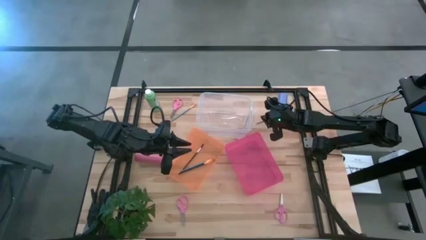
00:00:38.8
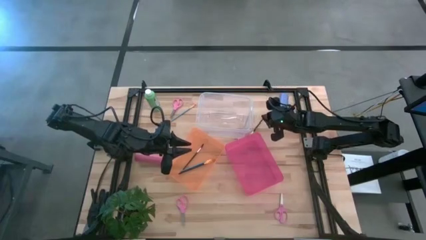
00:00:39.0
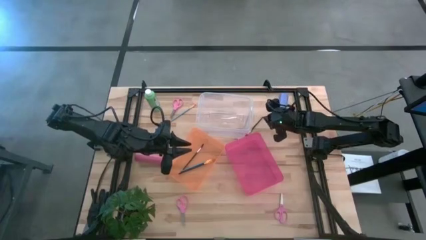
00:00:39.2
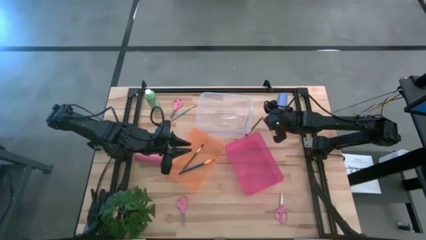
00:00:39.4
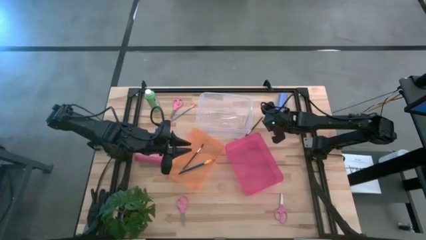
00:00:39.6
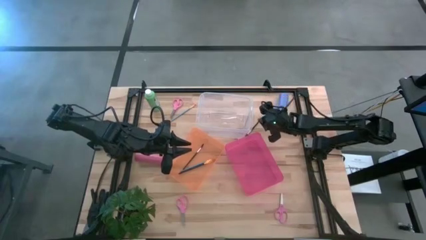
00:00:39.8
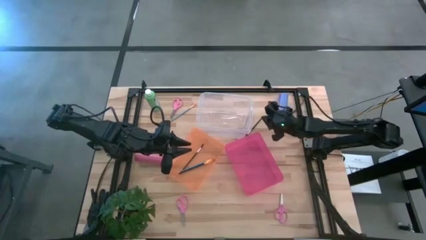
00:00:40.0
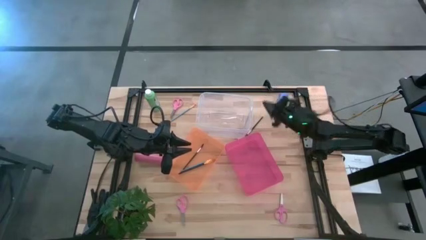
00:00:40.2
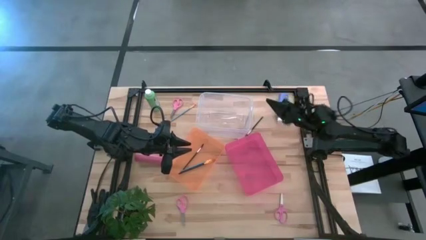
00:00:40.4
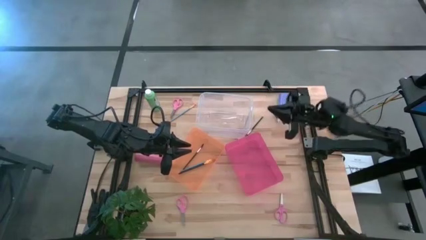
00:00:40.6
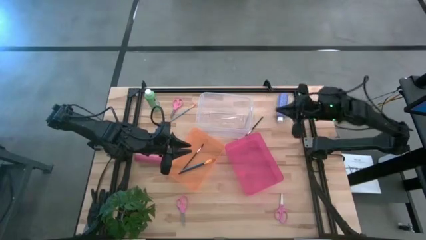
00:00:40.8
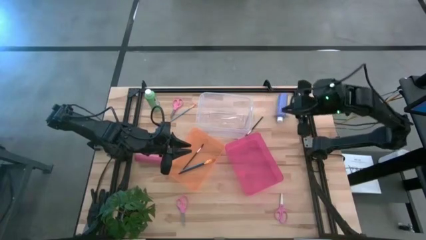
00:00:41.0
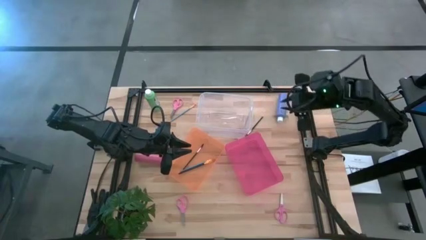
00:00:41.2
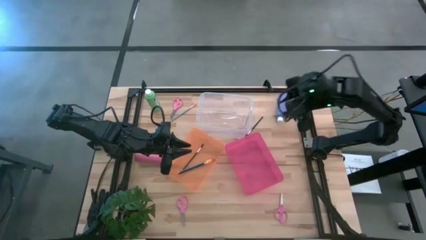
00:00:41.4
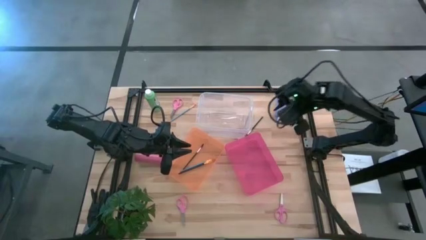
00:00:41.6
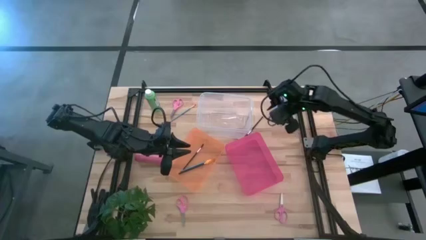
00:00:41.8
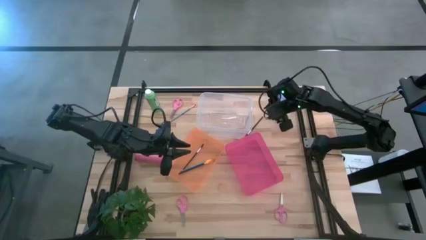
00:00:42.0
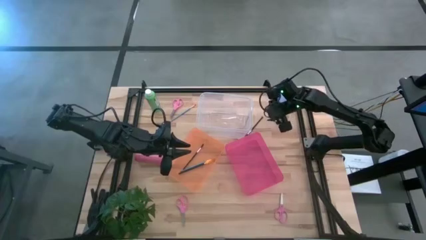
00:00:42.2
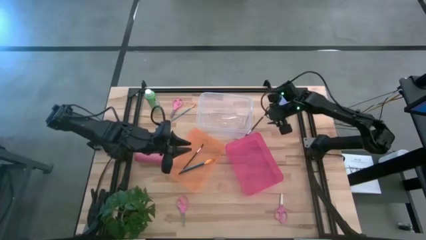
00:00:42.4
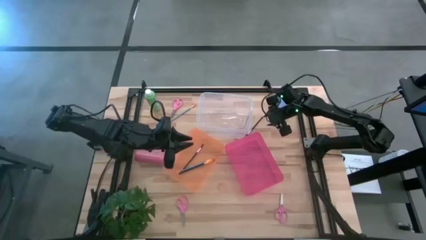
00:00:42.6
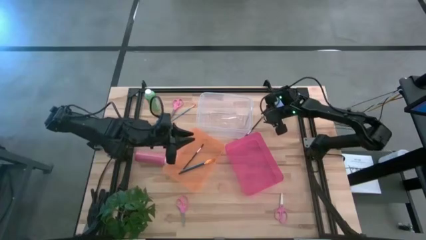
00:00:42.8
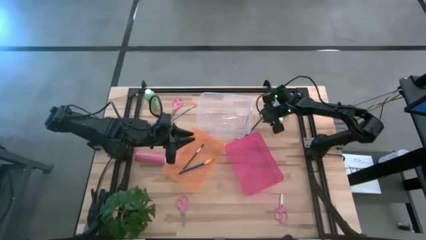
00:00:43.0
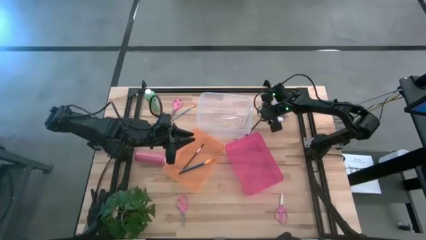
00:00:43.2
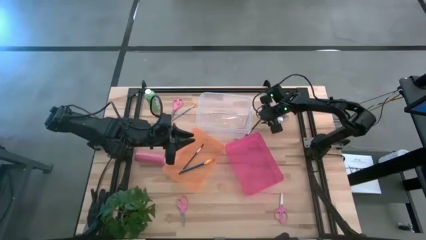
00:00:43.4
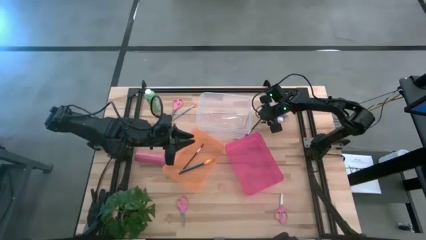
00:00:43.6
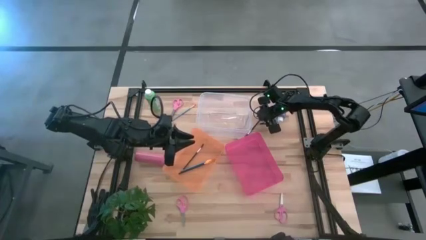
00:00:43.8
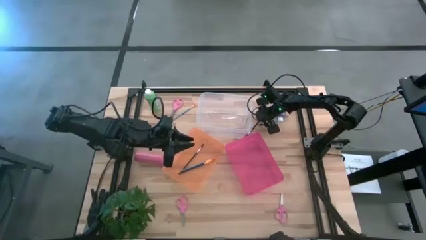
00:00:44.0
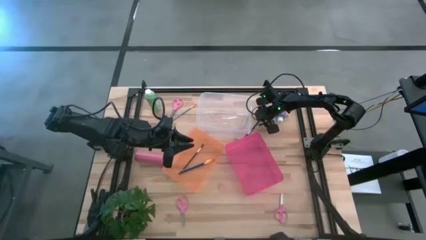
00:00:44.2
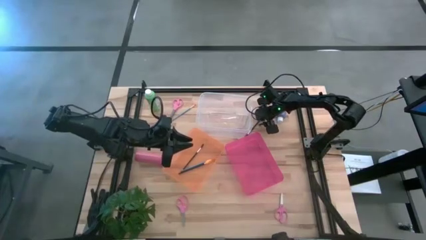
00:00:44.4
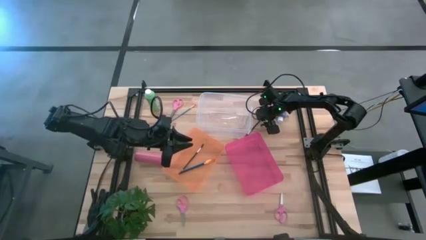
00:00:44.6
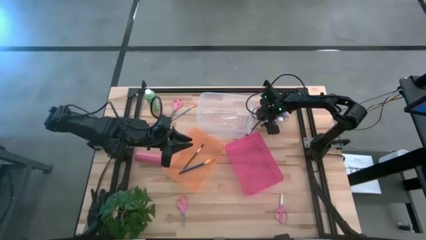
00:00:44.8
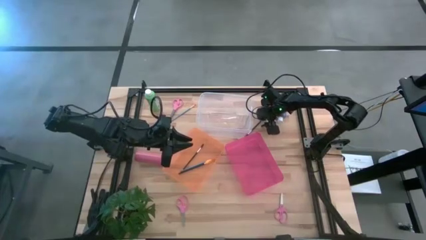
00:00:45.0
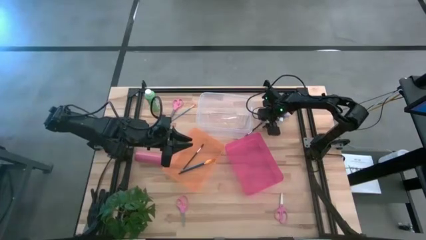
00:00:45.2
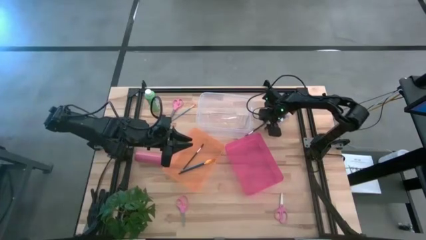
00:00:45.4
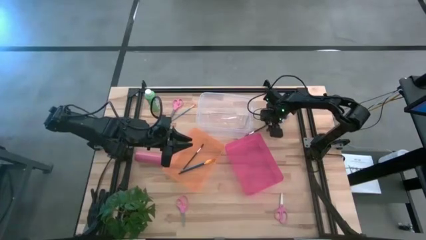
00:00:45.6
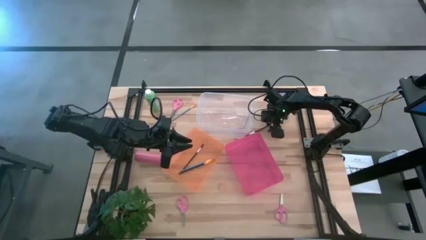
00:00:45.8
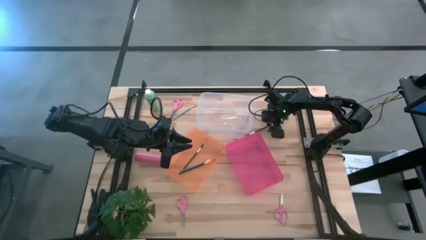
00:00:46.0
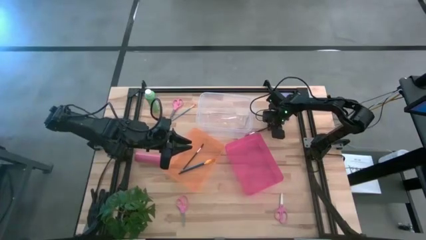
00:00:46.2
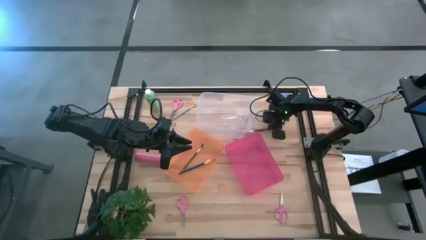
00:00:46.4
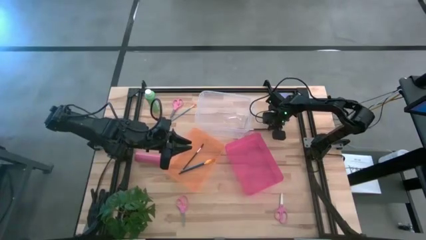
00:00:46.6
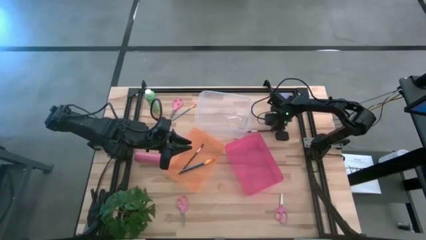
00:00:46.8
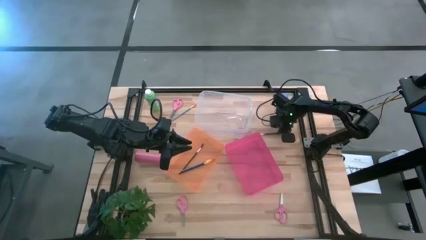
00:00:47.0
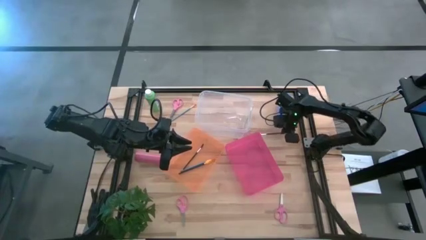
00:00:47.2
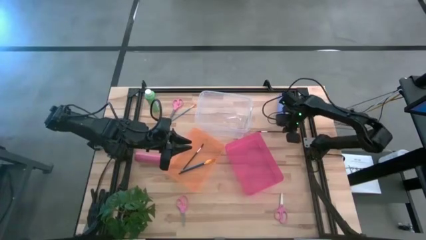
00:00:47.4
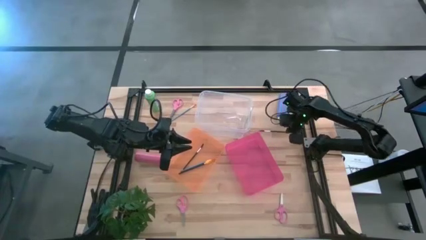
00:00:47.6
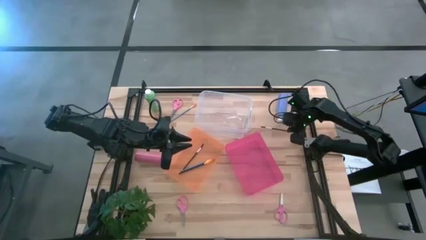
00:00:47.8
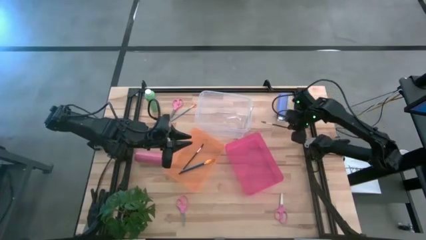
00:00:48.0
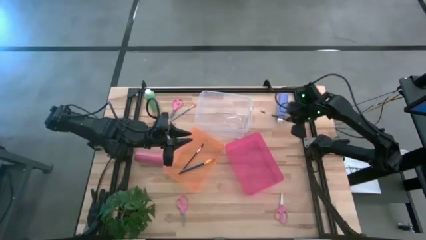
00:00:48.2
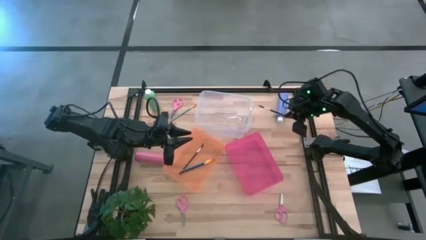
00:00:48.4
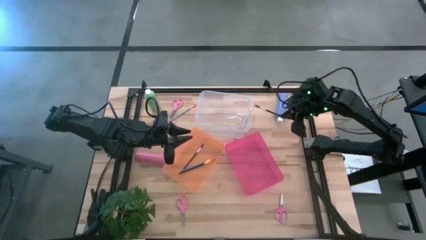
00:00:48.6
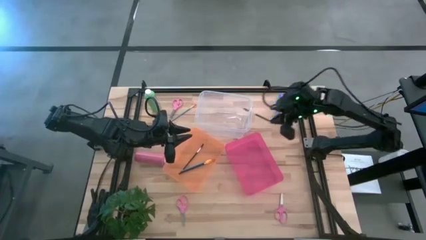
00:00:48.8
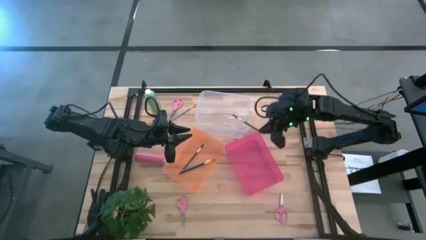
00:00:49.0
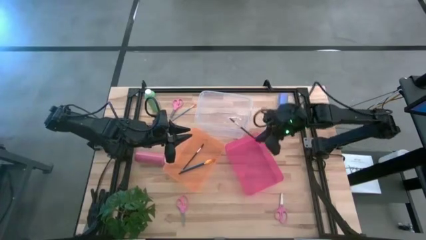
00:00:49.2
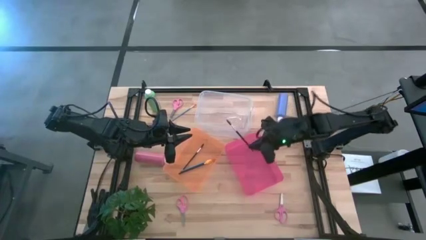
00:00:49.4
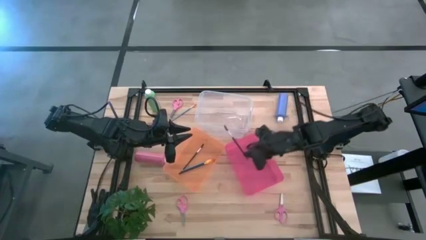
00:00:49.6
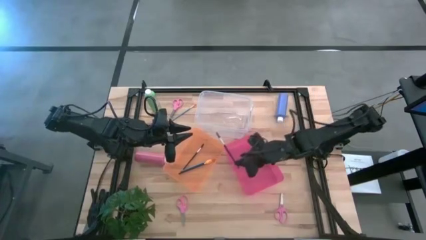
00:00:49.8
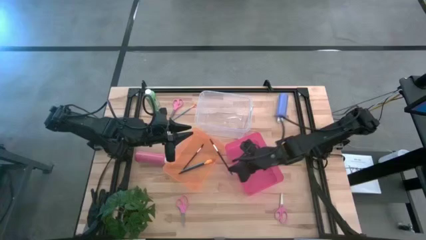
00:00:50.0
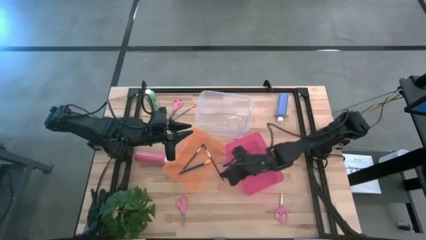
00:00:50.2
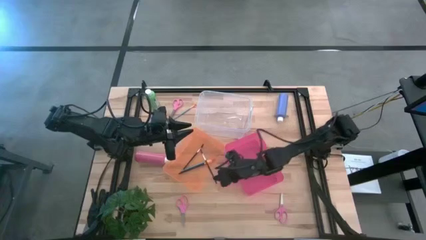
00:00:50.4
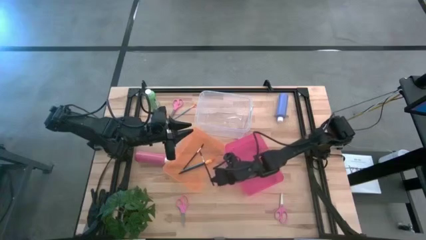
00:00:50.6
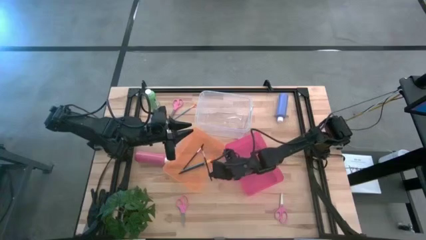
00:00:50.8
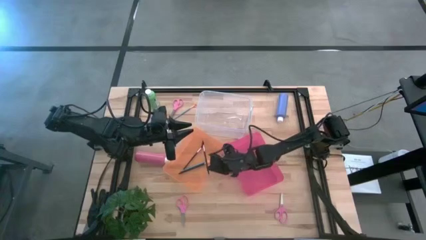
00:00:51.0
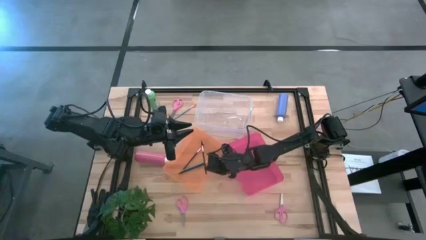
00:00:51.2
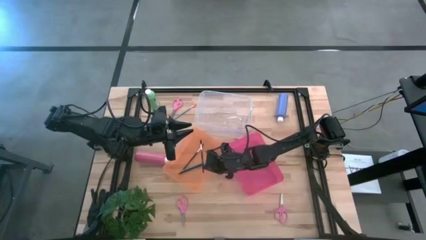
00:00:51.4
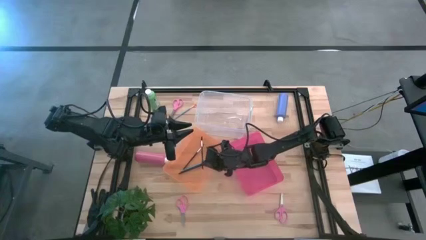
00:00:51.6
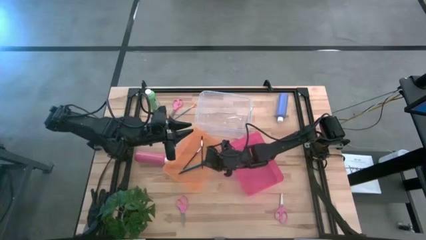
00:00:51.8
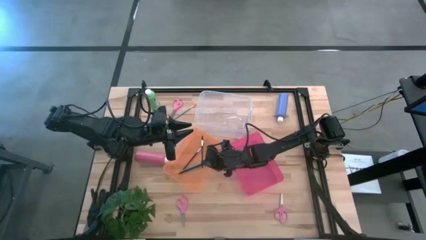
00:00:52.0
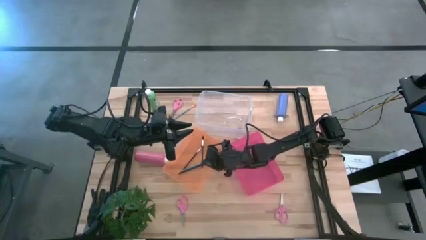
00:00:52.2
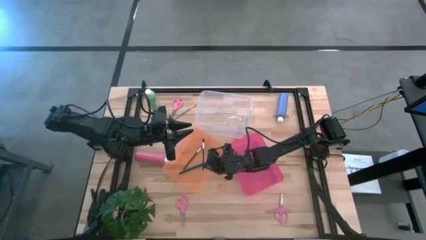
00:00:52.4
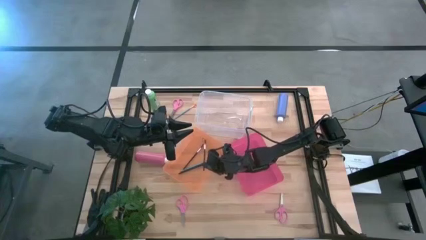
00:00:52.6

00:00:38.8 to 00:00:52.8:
Task: Pick & Place Paint Supplies
Put the black brow brush into the orange bin

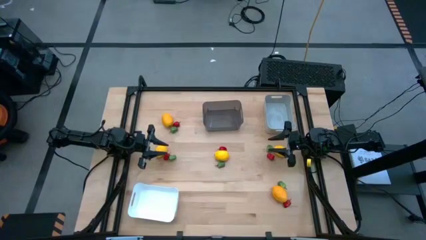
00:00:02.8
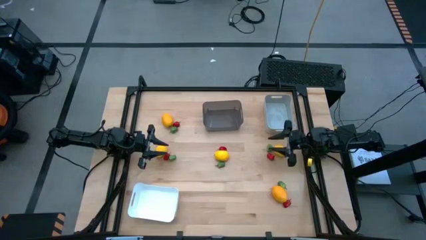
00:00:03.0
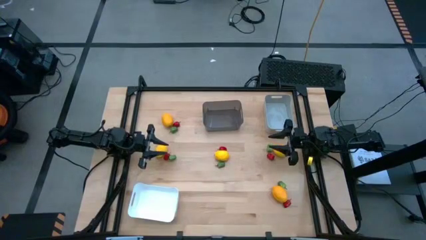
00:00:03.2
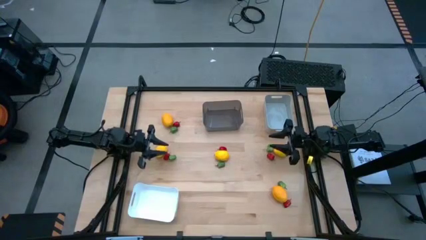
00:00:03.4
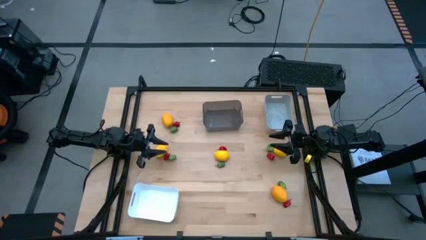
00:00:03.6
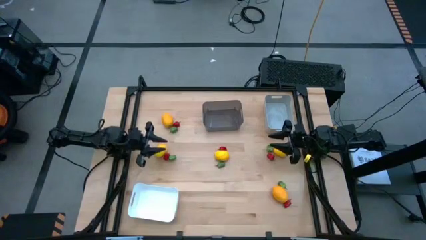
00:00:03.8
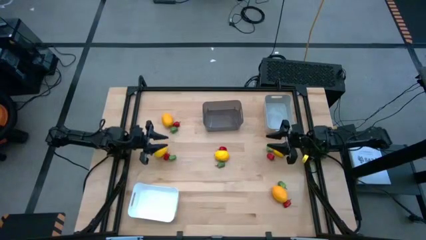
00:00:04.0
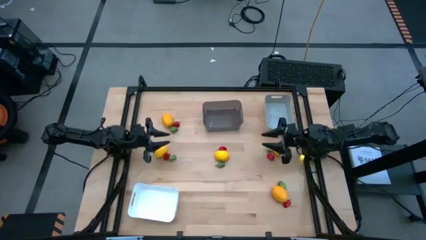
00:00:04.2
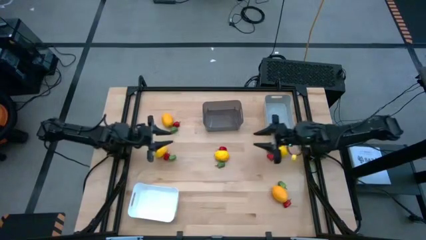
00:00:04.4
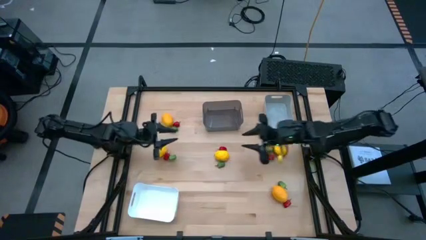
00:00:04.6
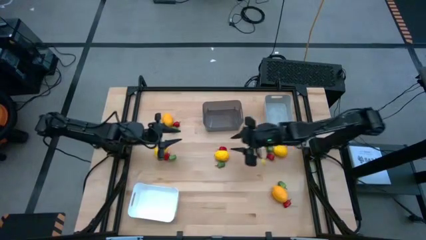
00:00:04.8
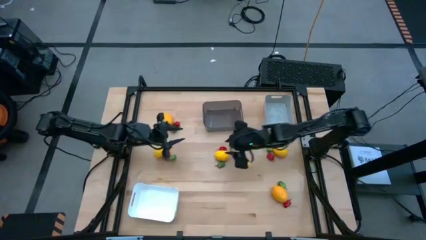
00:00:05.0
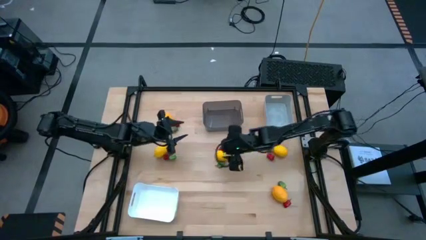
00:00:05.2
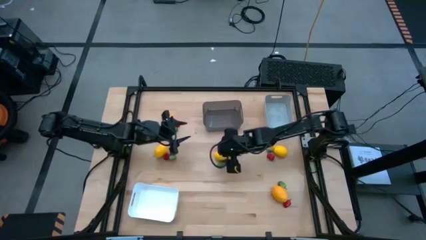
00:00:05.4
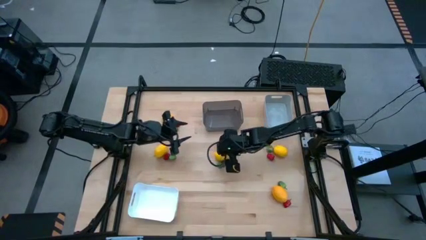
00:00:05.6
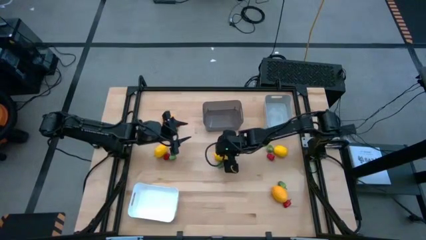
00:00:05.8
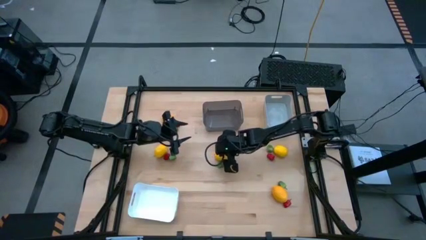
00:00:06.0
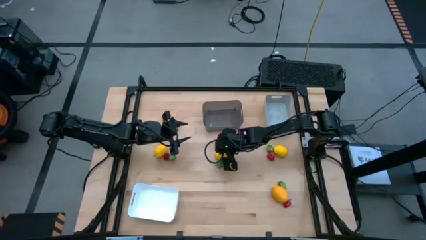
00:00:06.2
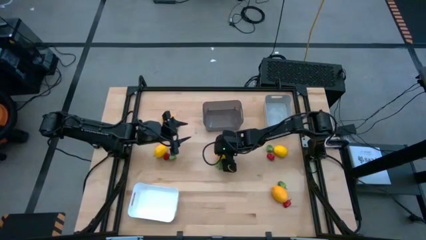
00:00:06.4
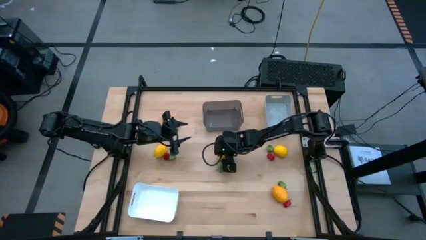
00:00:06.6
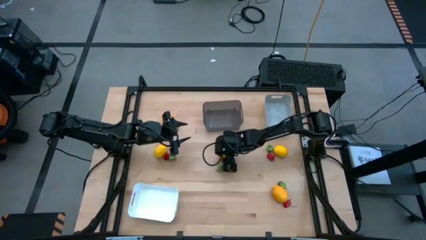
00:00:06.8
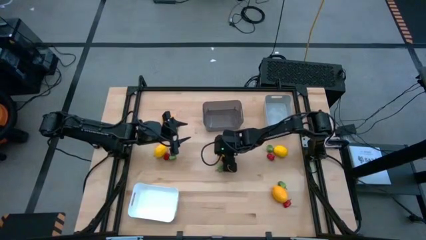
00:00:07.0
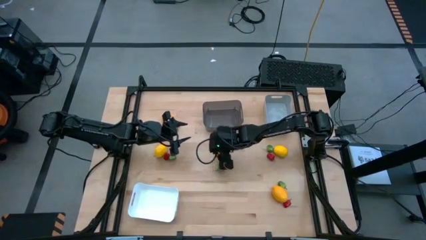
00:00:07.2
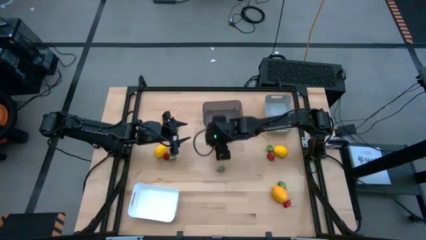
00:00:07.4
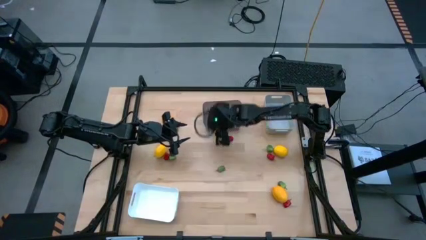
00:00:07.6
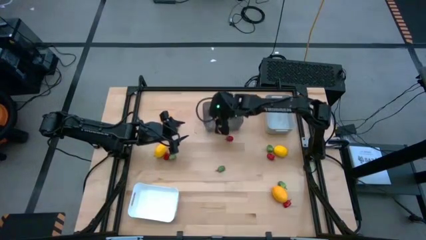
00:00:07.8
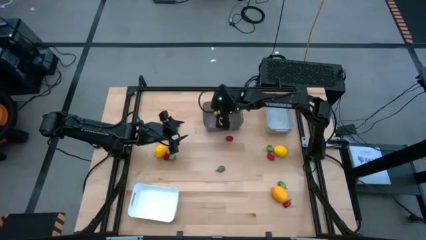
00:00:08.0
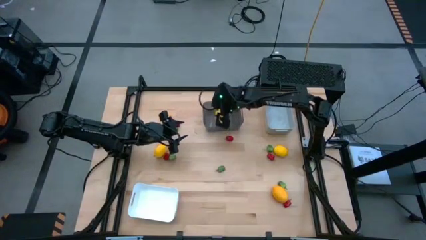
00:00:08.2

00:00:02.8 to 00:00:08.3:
Task: Sort produce into baskets
Put the lemon into the black bin
